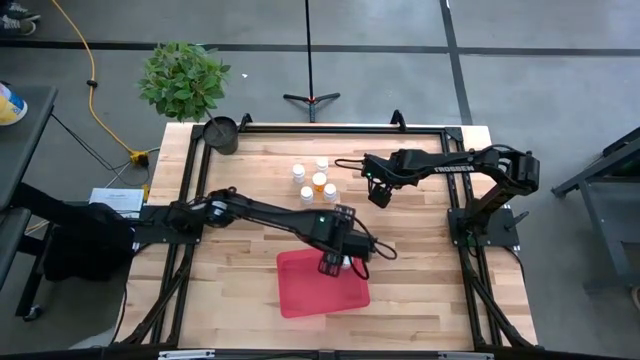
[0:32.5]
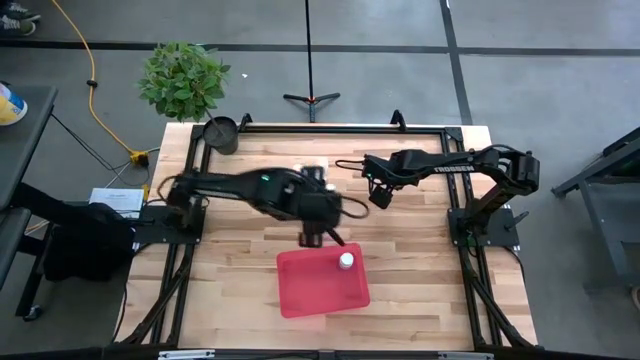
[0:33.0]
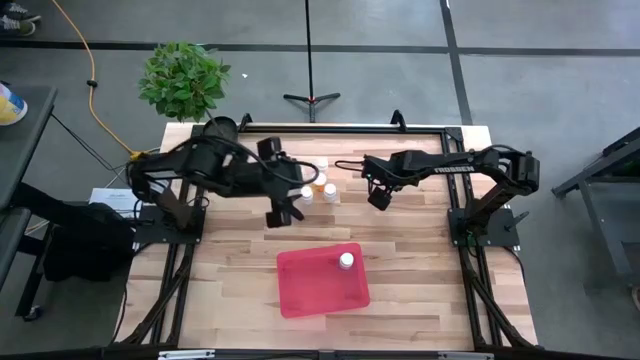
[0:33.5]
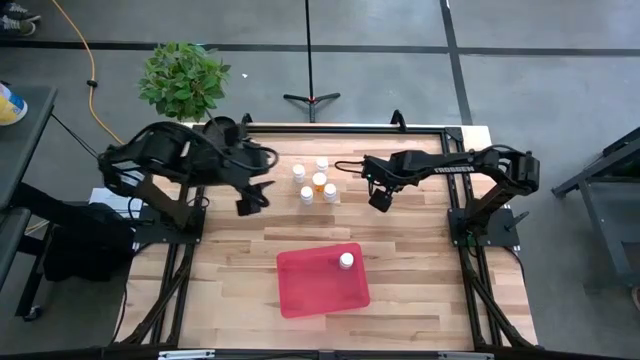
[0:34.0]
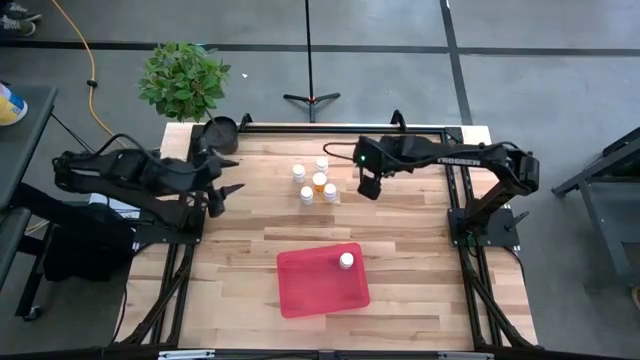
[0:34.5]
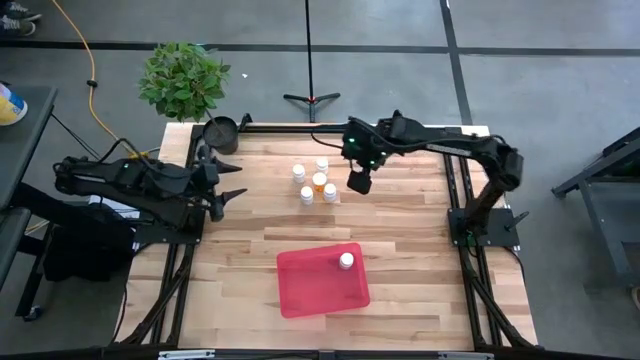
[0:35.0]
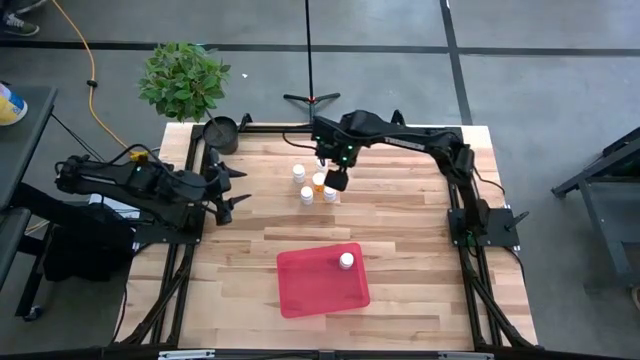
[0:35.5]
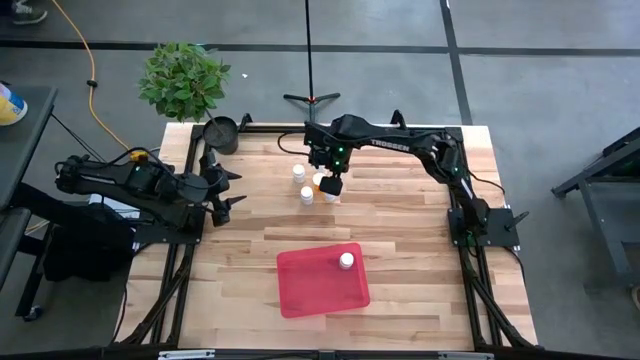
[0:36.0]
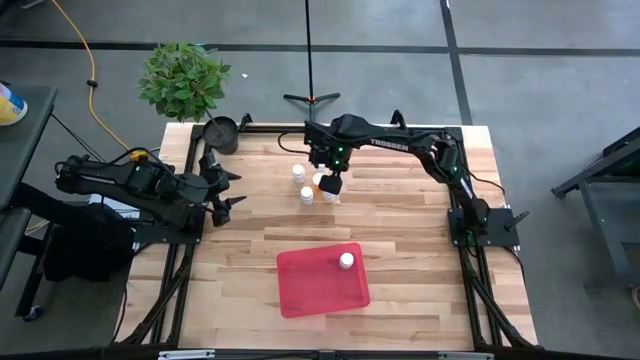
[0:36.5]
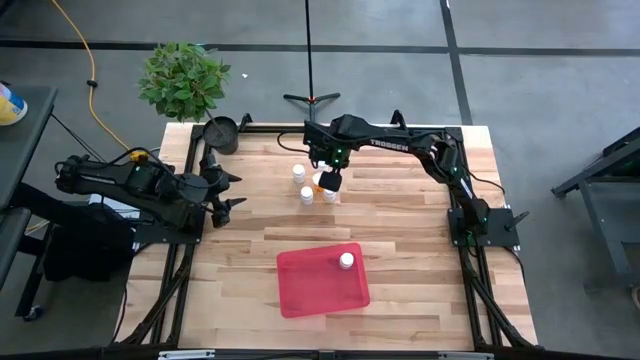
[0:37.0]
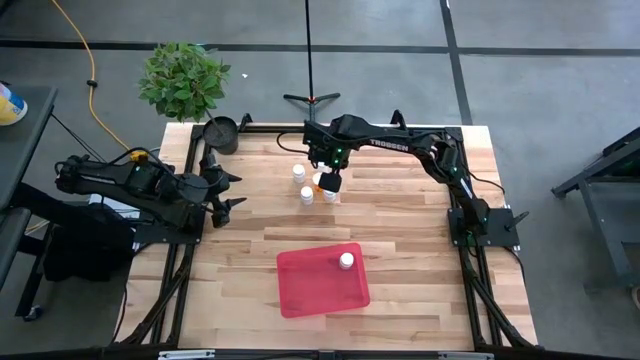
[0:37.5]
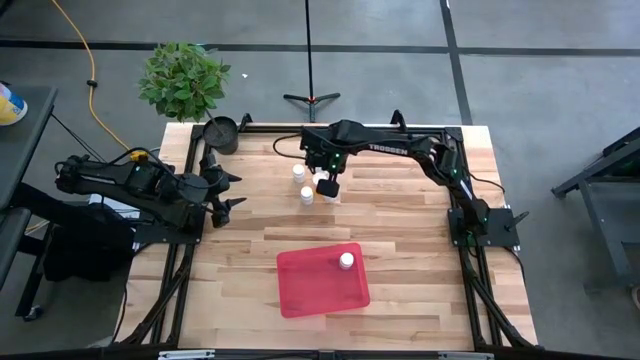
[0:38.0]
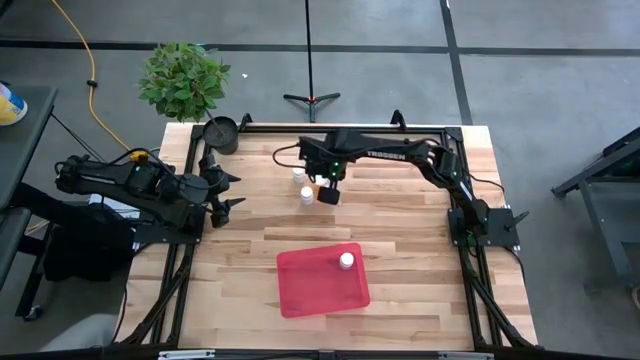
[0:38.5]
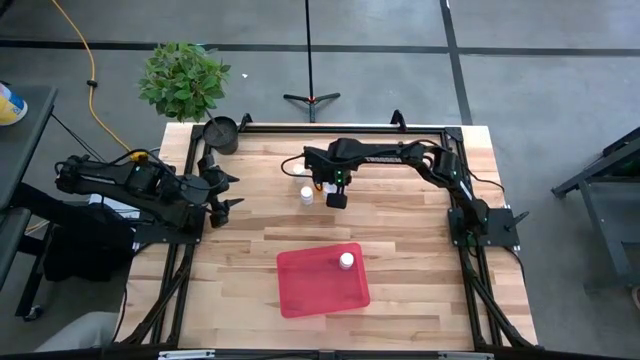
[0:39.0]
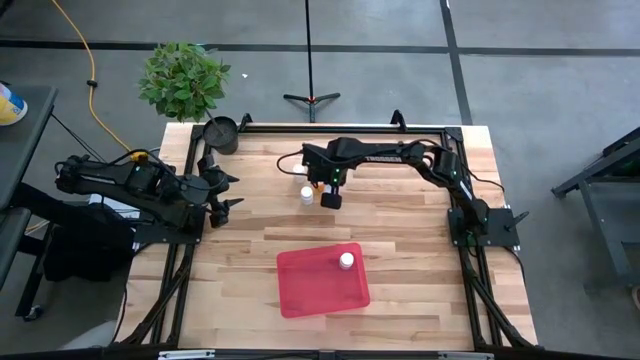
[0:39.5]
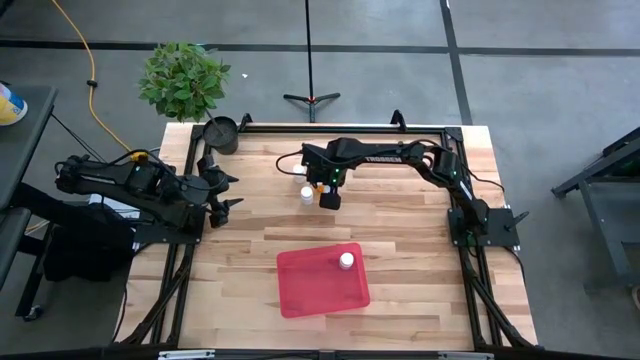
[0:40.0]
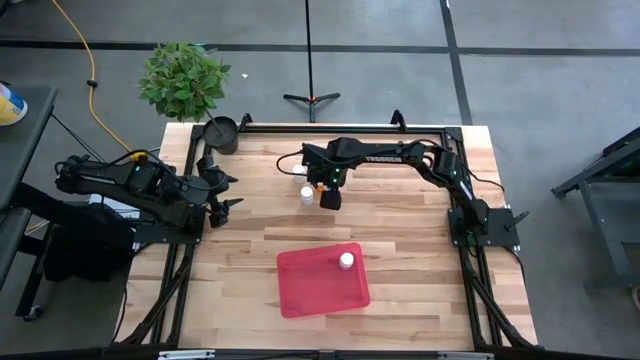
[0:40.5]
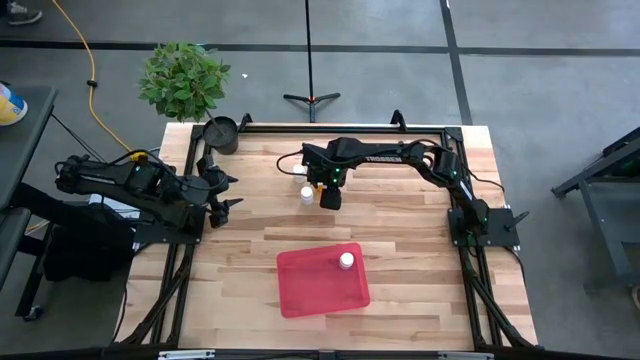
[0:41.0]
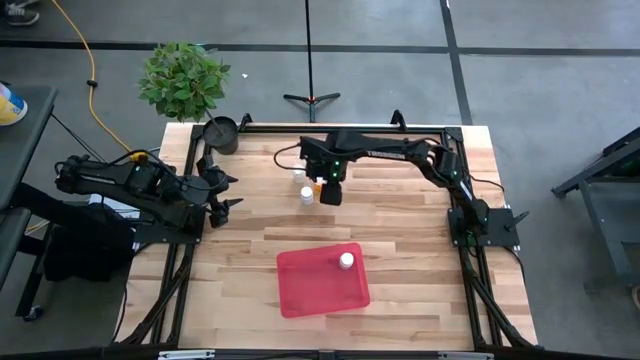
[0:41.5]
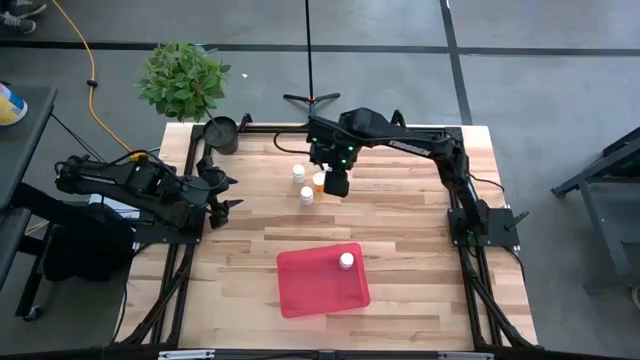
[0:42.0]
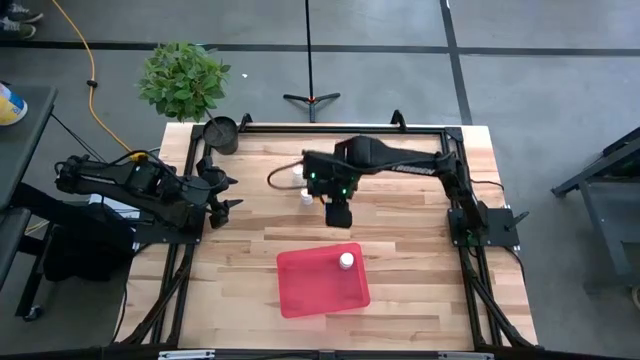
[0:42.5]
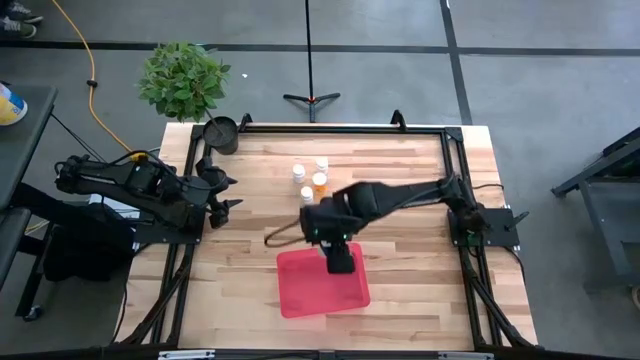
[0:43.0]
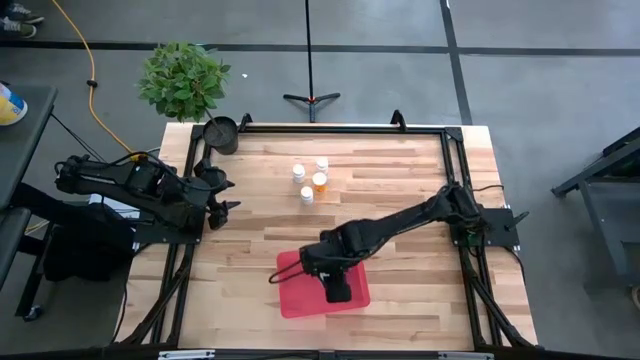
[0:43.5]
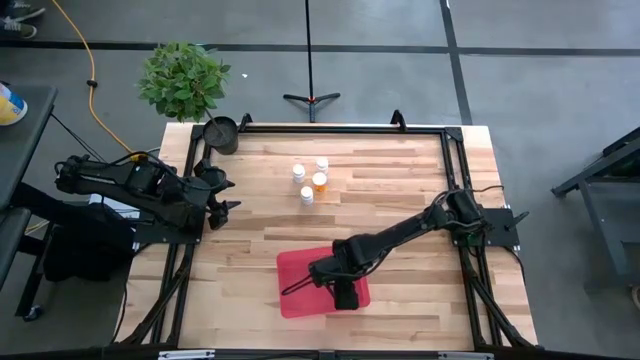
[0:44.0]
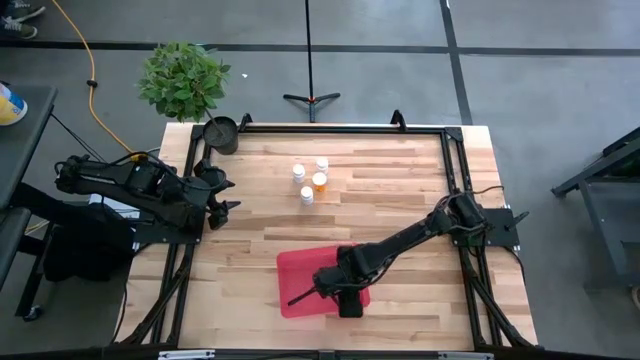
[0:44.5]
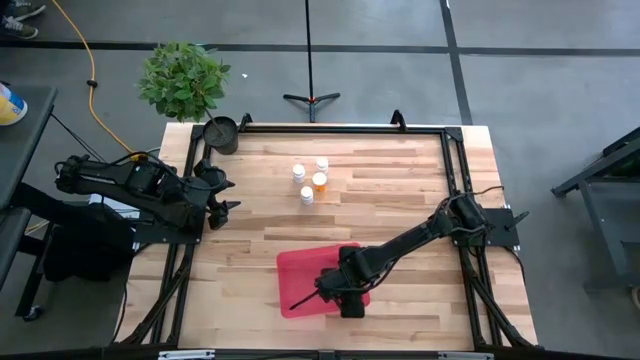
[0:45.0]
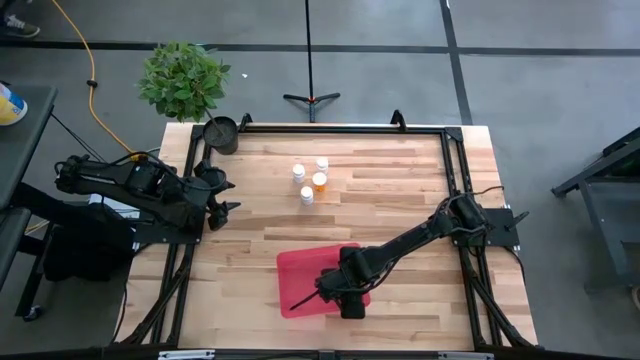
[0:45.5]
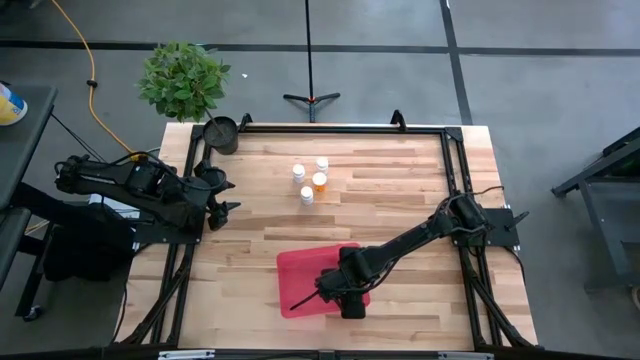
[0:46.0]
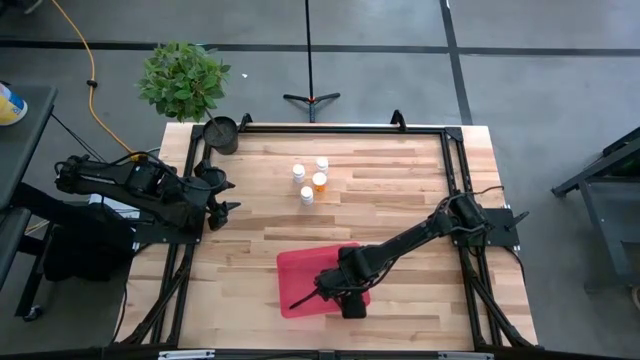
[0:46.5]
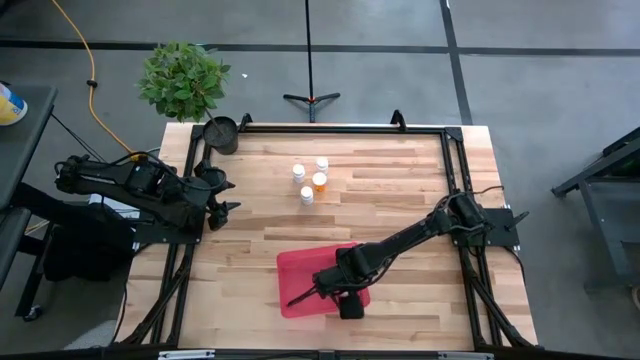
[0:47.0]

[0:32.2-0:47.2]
Task: Pick and place pill bottles into a basket
Put the white pill bottle into the red bin
